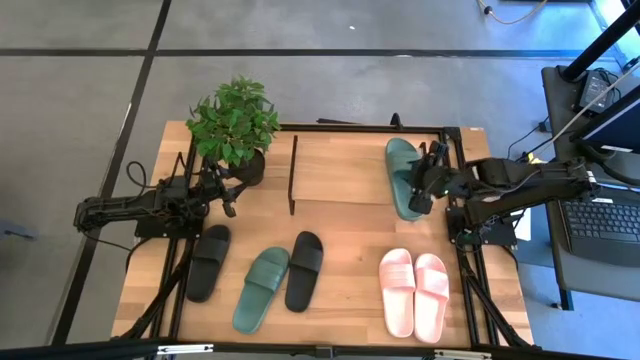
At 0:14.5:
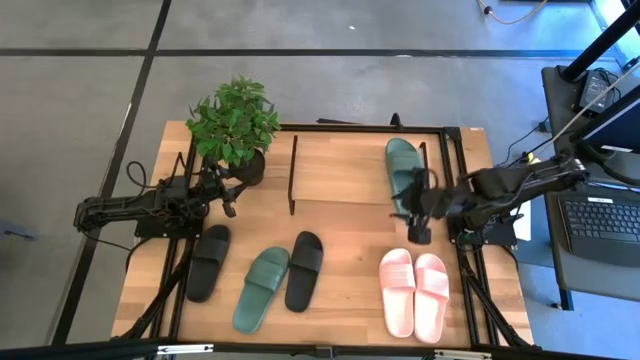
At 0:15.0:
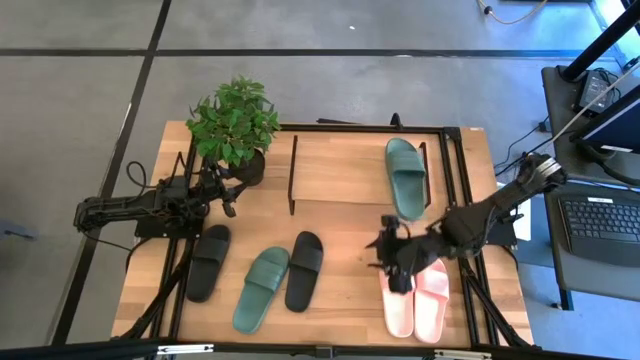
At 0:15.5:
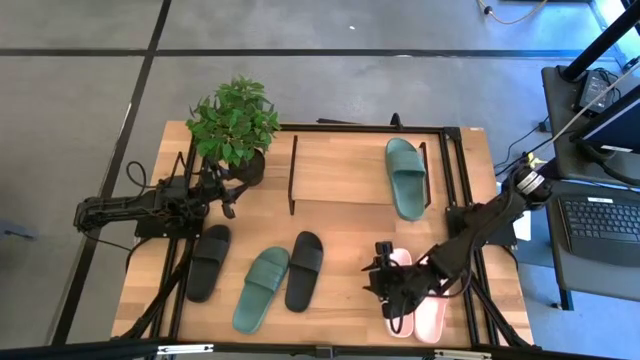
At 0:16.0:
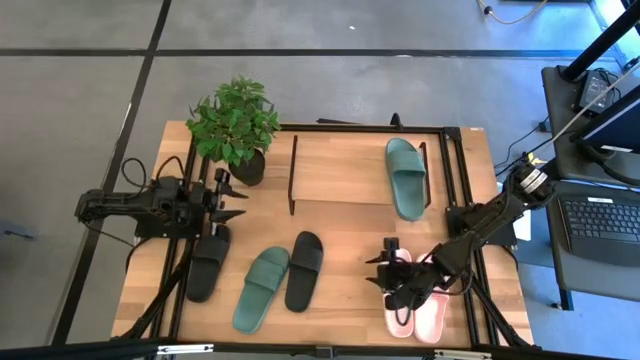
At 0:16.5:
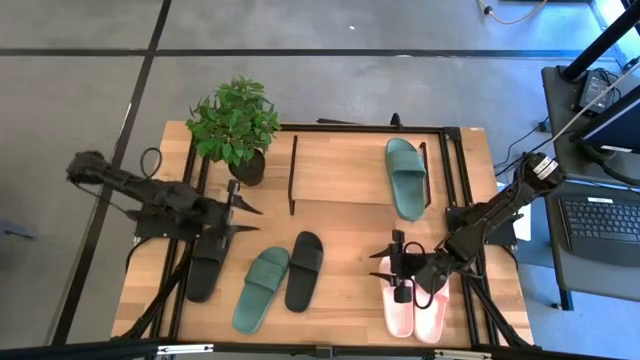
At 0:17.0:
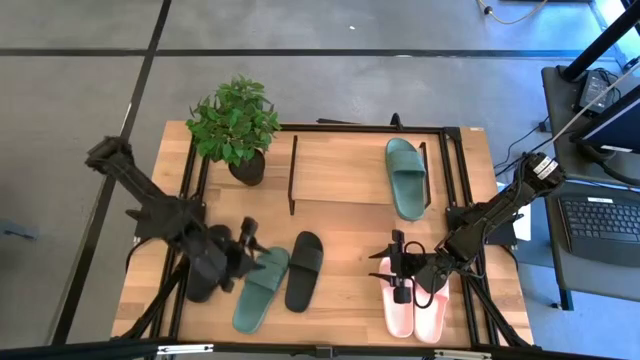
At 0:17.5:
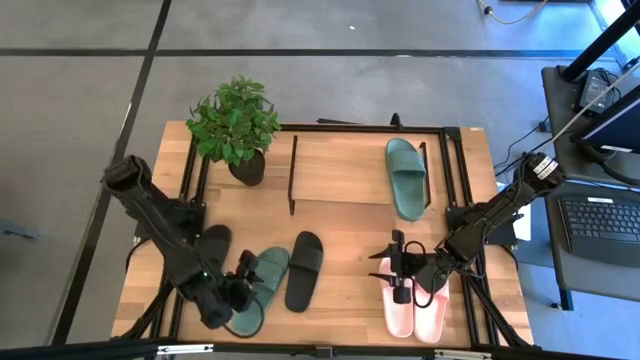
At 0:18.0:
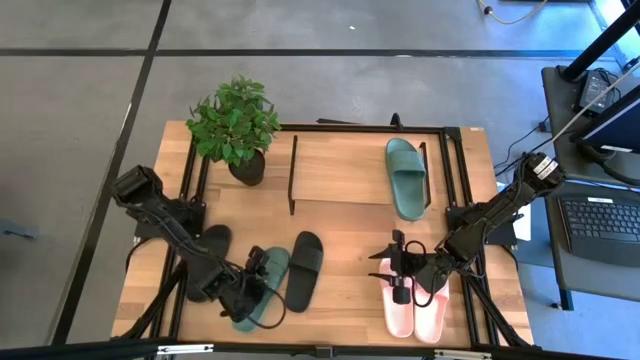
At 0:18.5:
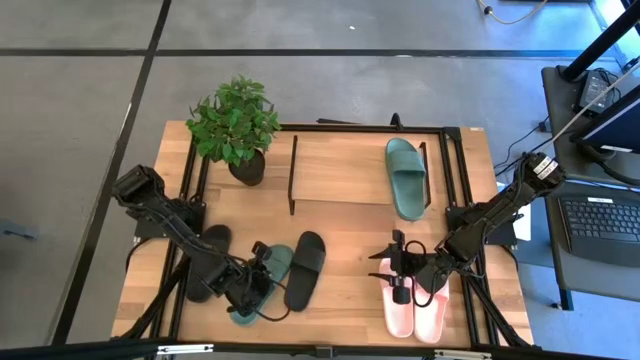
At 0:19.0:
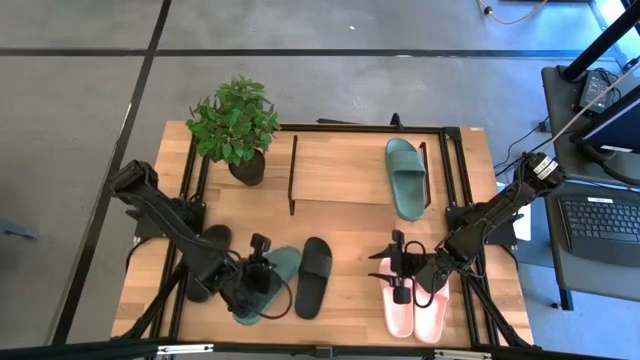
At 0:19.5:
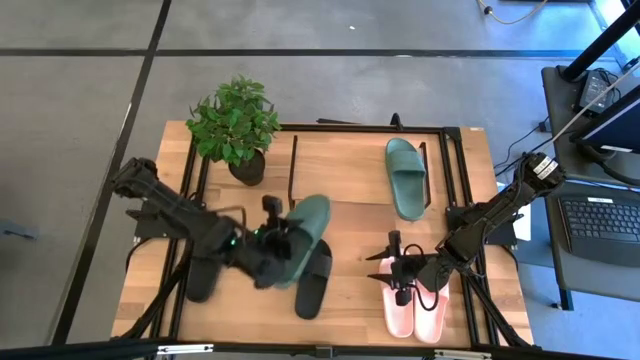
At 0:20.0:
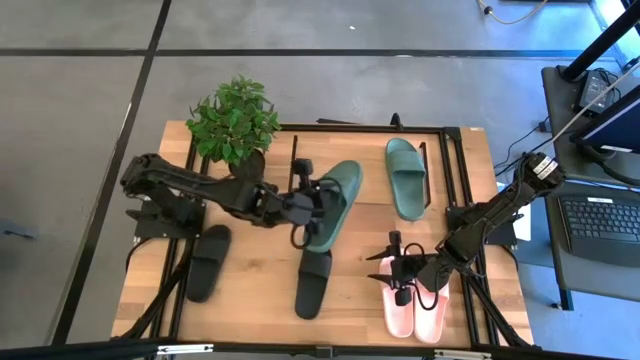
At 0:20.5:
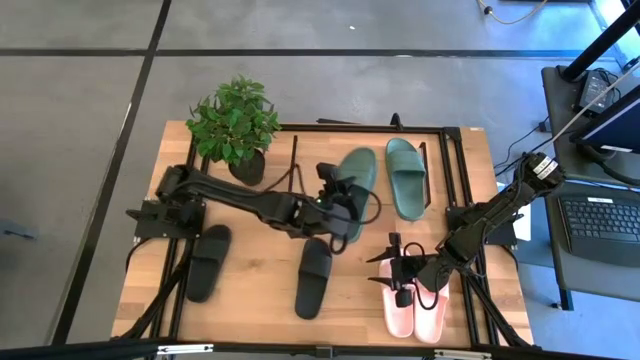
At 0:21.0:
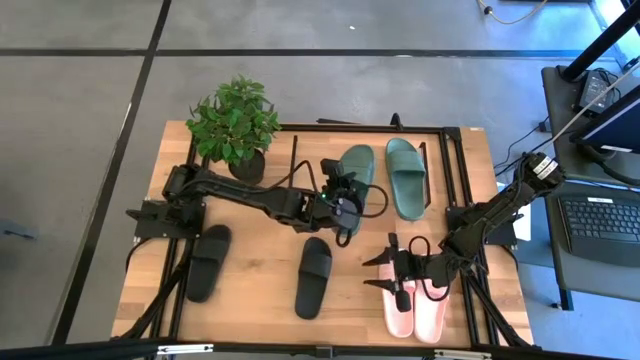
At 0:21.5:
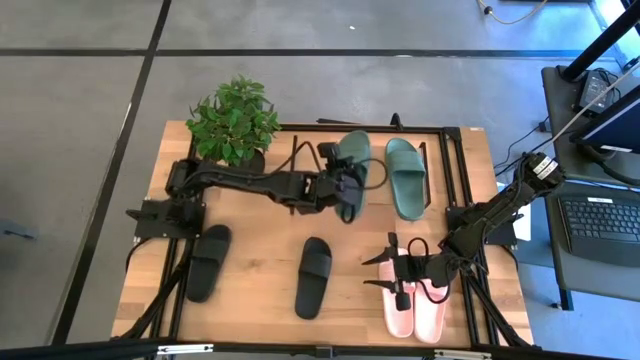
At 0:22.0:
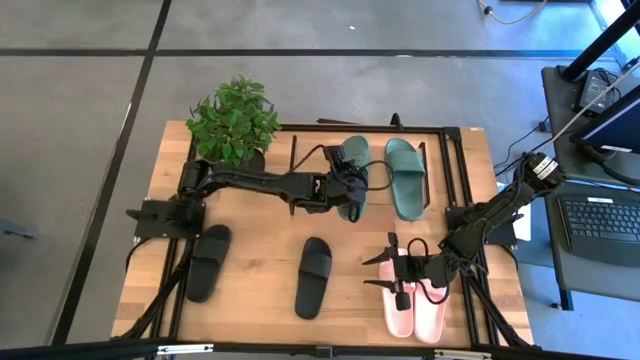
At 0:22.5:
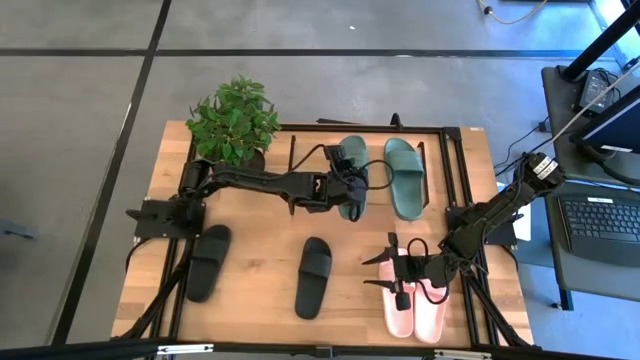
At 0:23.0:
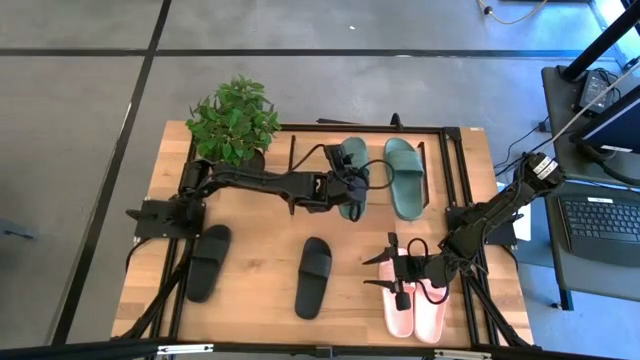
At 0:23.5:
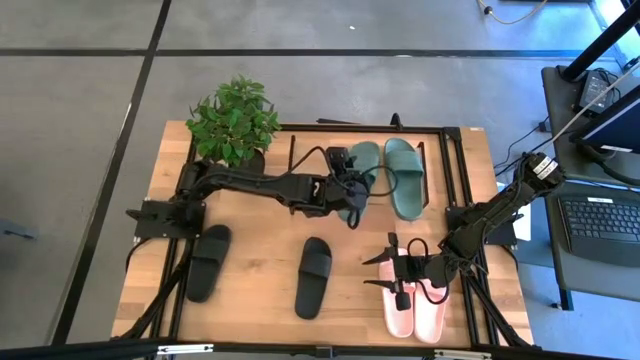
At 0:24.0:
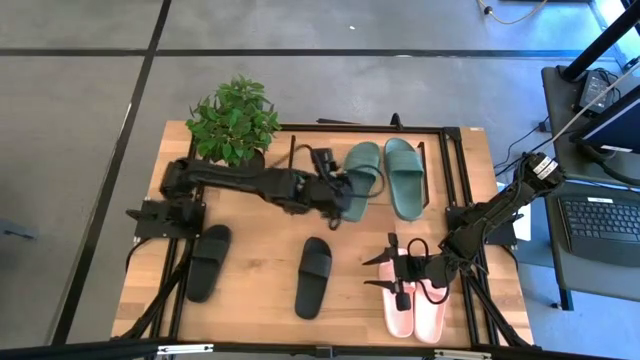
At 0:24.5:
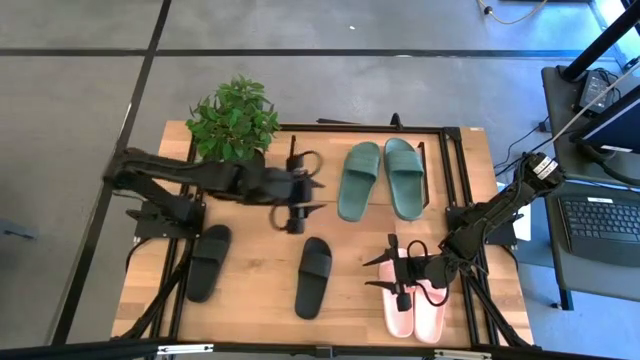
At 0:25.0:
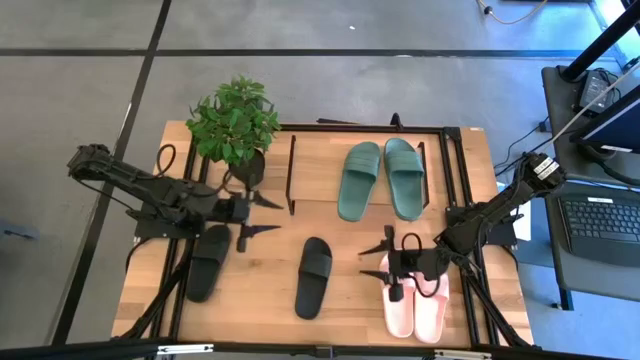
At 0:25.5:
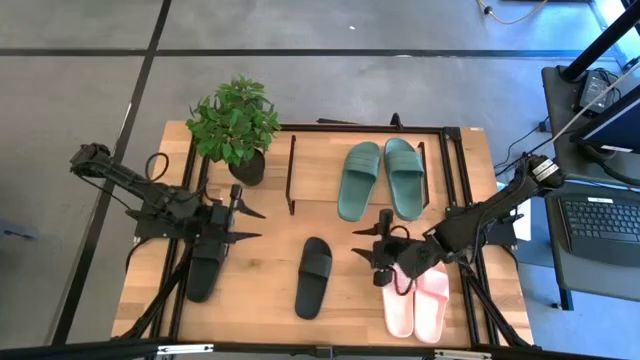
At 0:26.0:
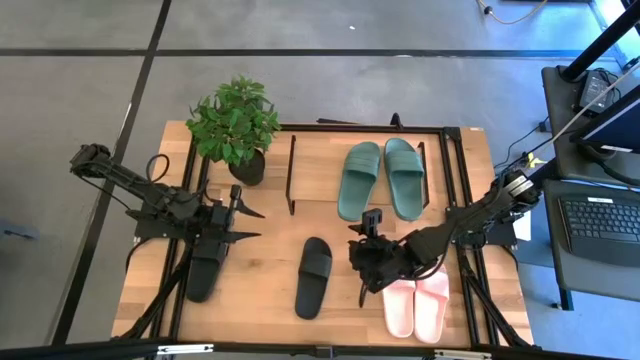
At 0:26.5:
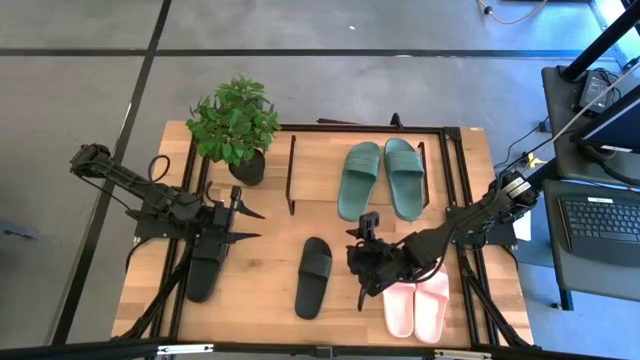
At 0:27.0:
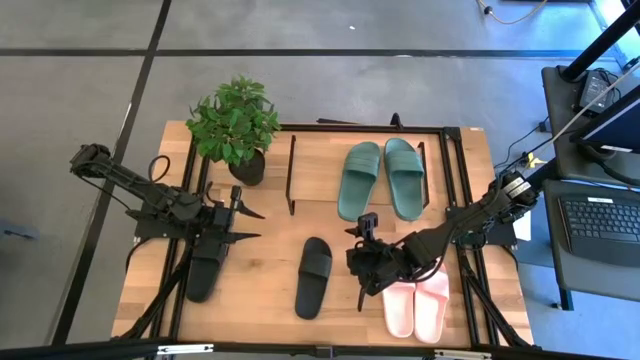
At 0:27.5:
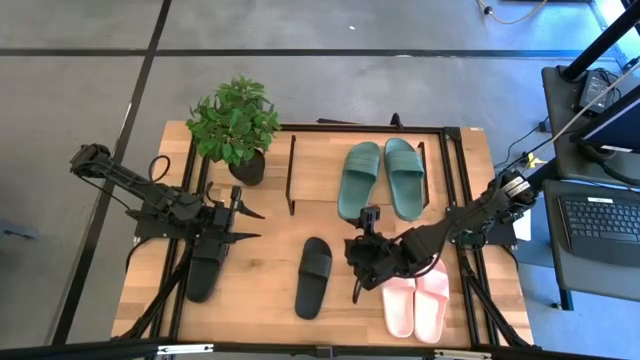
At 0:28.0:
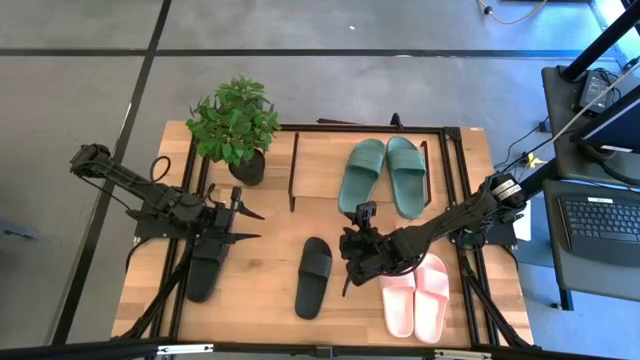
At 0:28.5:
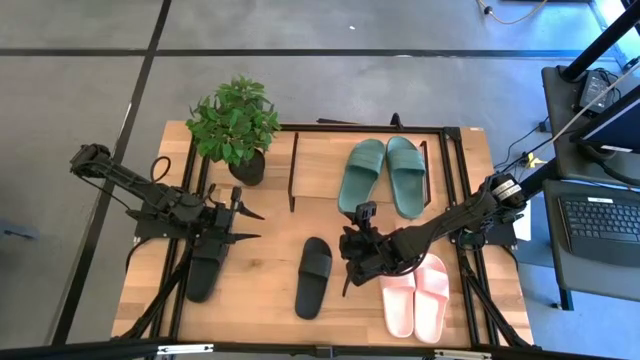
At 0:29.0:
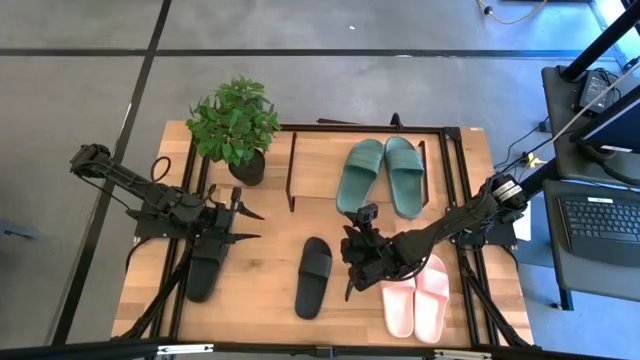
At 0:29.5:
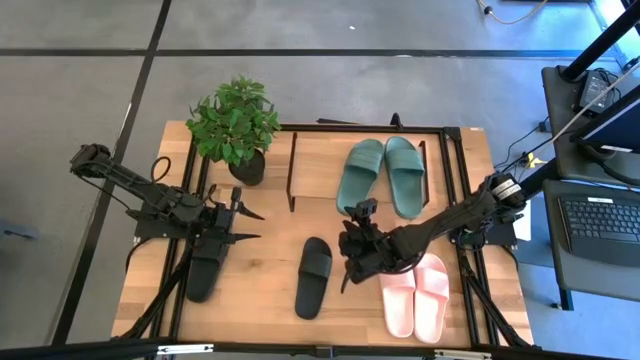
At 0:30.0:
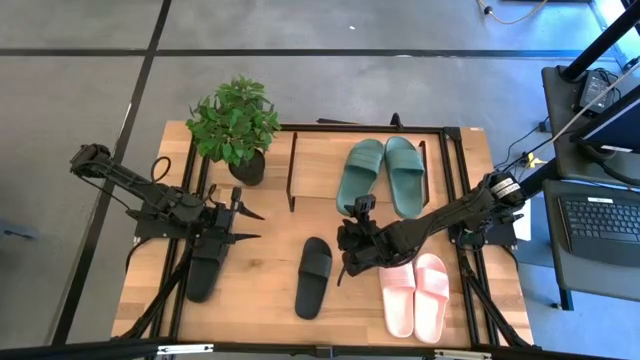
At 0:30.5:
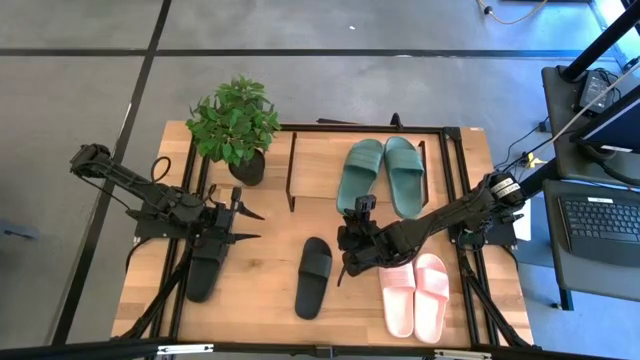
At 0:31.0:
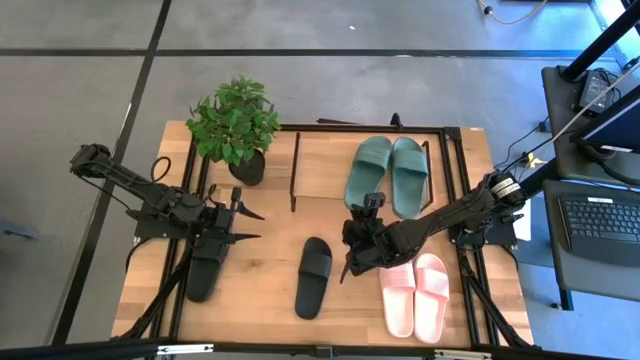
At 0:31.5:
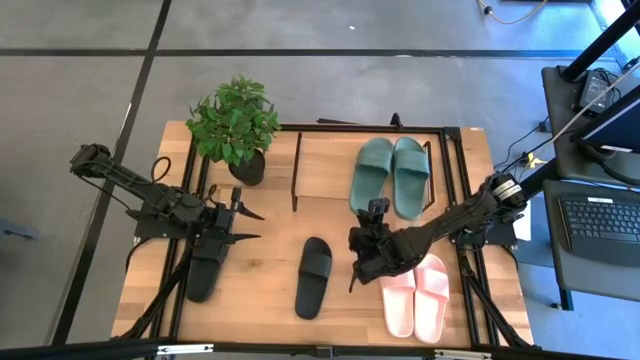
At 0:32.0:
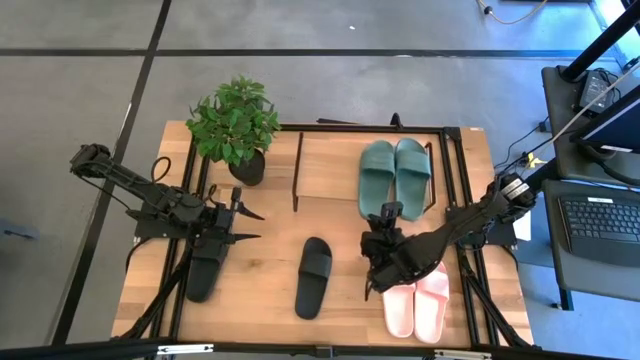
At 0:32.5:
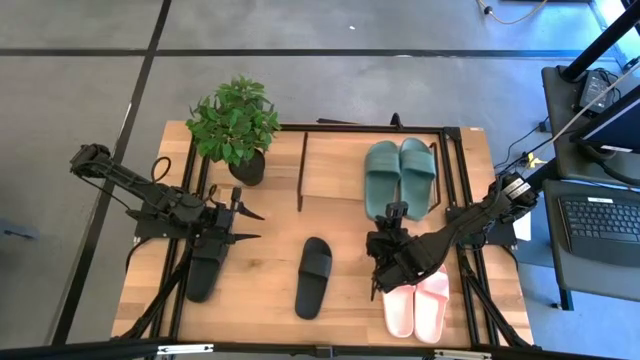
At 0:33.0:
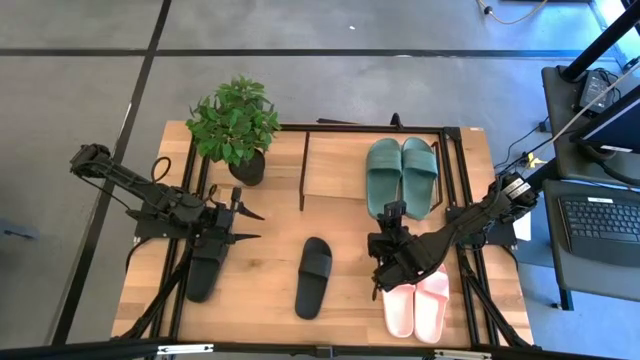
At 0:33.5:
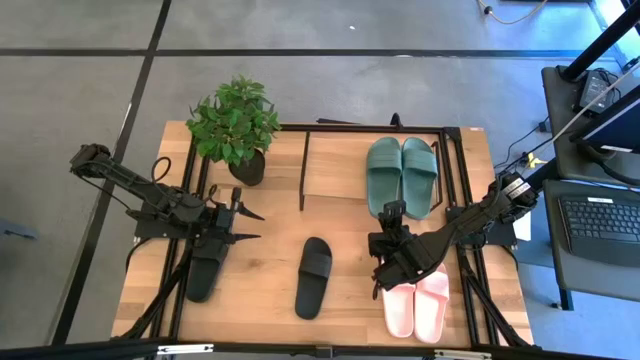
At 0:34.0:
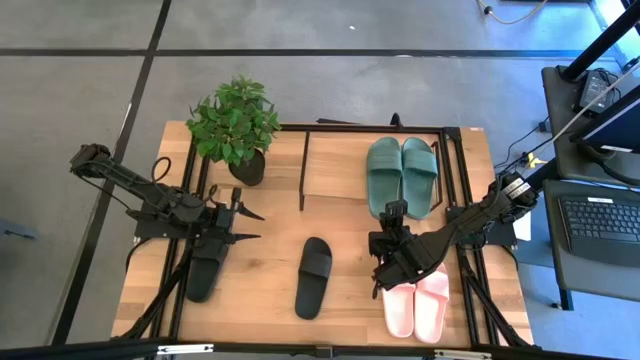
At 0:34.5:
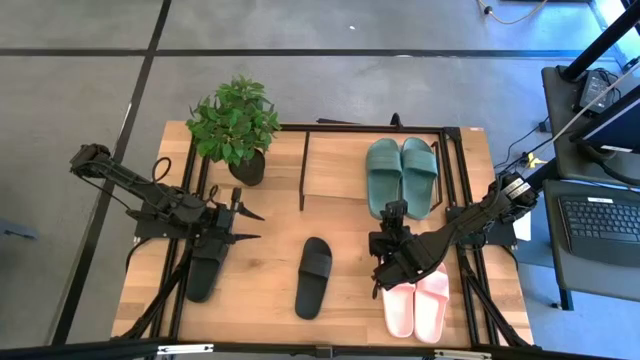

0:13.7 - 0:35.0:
Task: Pick and place slides into the shelf
Put the green slides on the shelf
